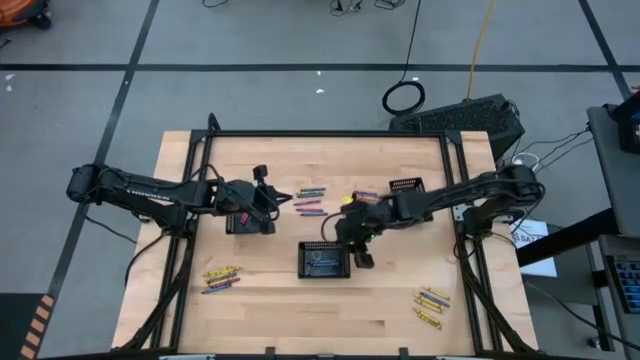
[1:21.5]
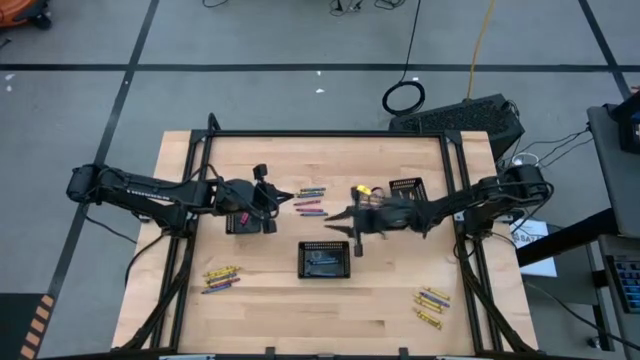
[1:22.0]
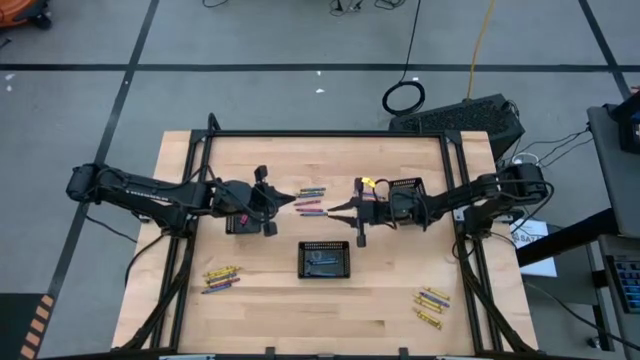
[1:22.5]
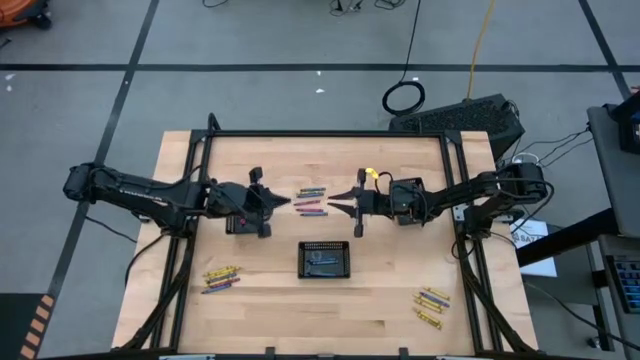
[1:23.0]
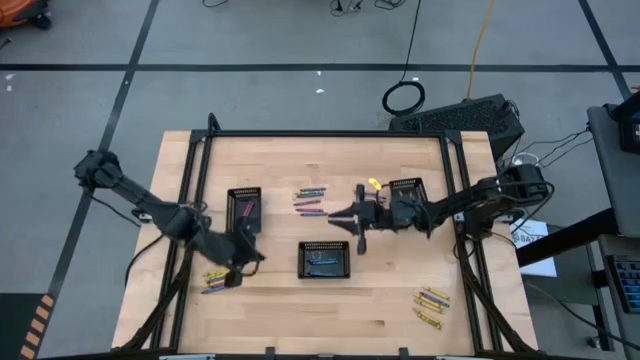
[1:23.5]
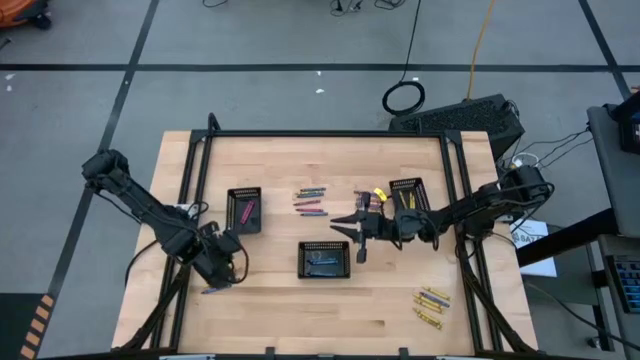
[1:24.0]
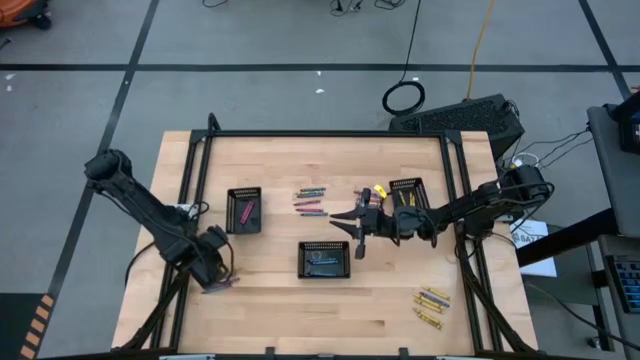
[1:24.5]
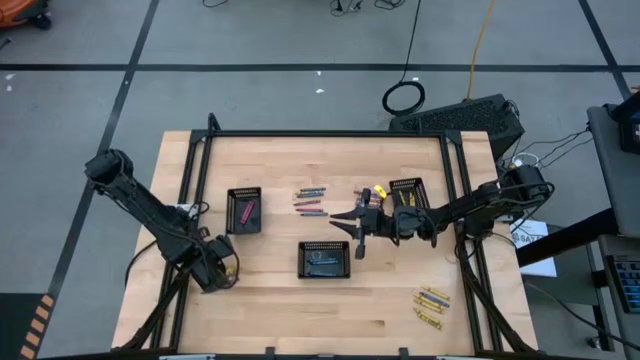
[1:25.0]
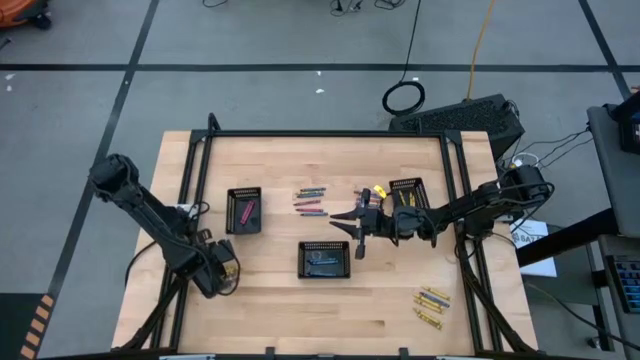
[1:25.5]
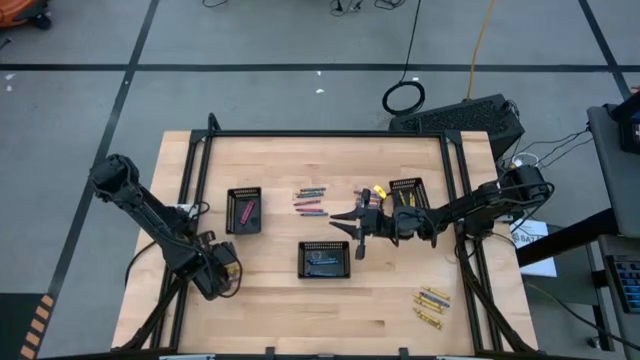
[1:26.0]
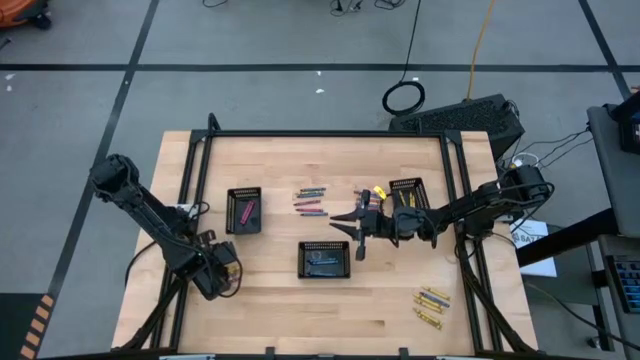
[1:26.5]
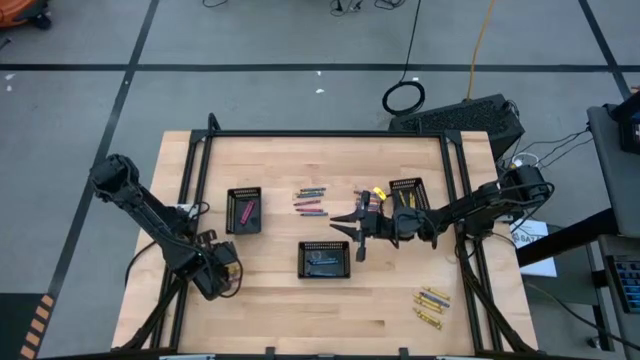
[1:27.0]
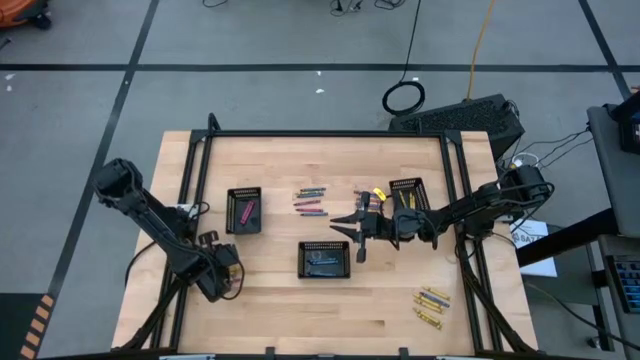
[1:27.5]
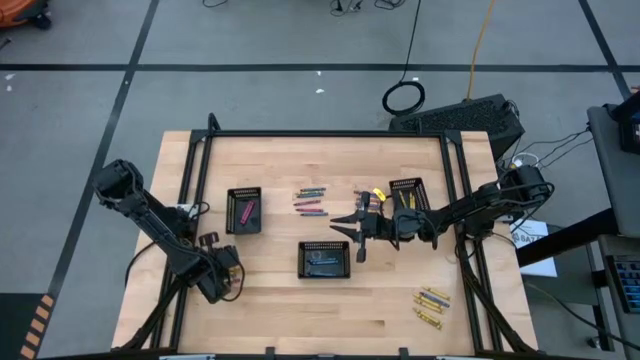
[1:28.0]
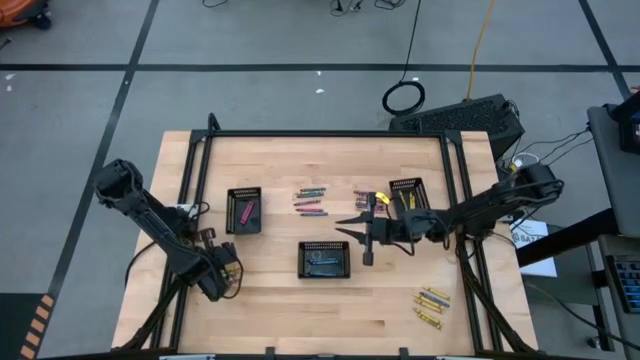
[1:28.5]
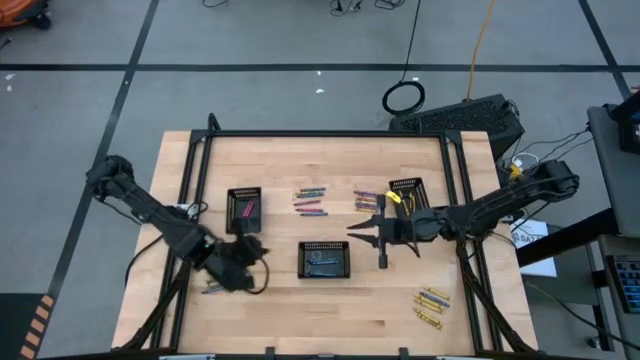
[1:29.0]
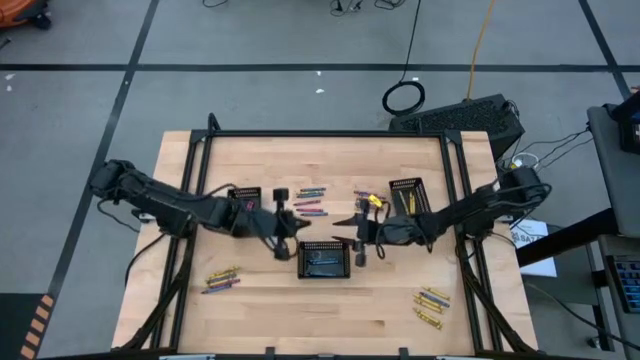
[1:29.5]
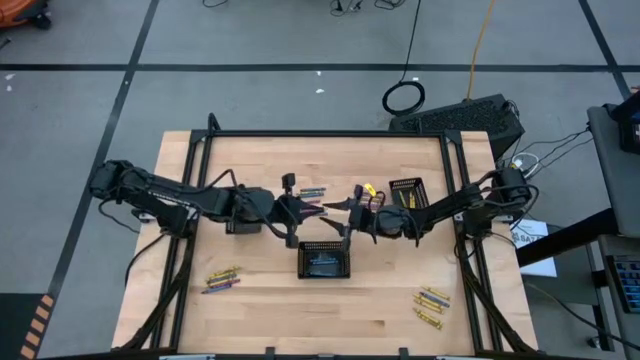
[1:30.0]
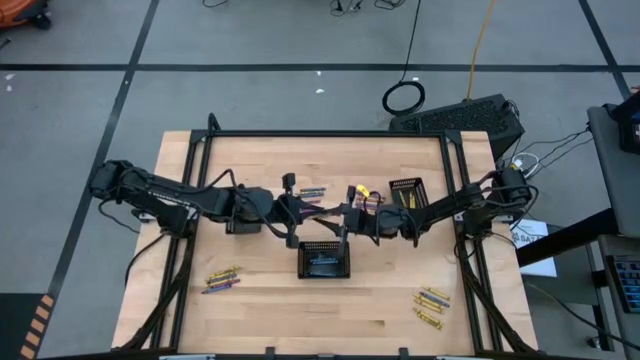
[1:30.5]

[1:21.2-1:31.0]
Task: Sort crayons
Put the yellow crayon into the right black basket

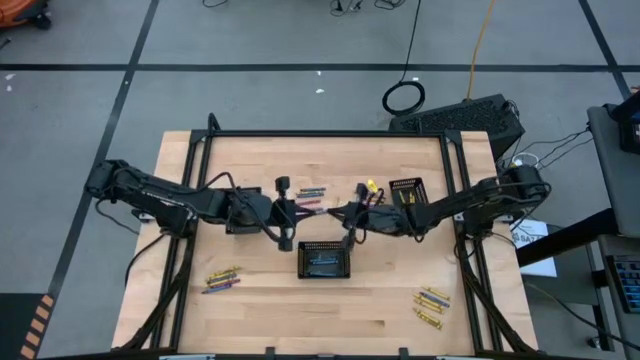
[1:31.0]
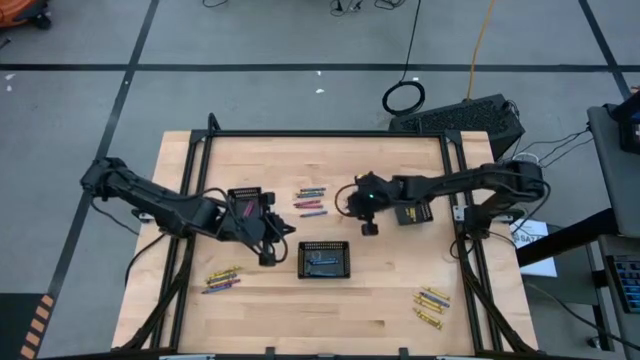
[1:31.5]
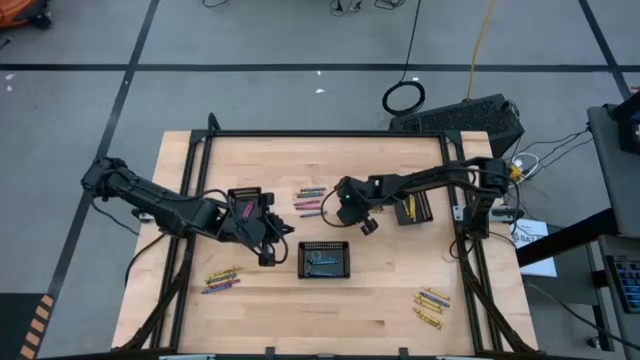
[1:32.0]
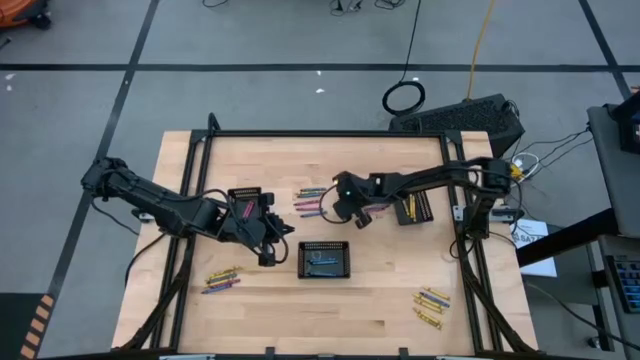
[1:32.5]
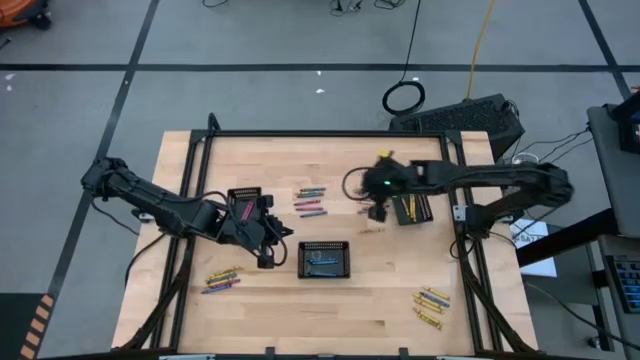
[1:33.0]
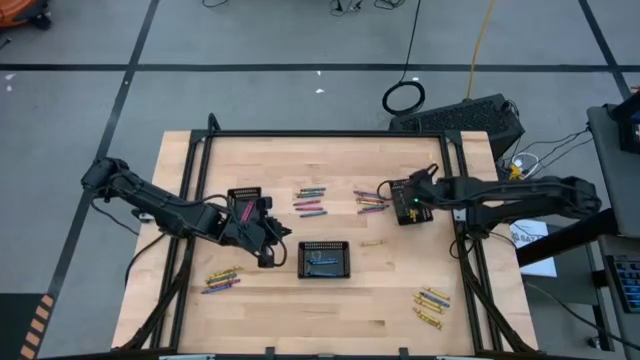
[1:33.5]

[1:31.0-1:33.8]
Put the yellow crayon into the right black basket

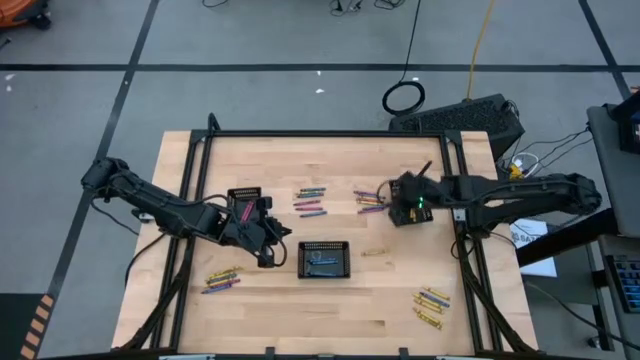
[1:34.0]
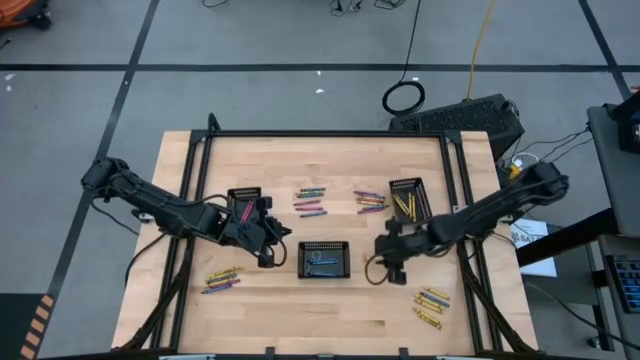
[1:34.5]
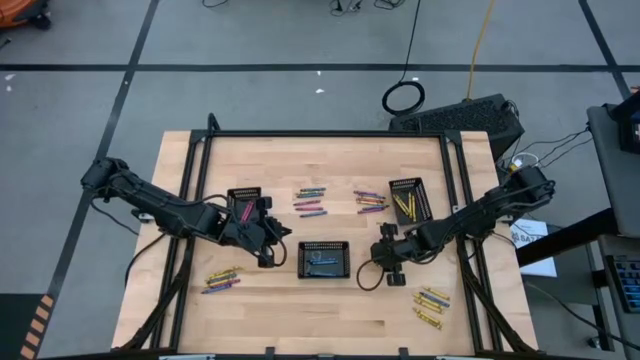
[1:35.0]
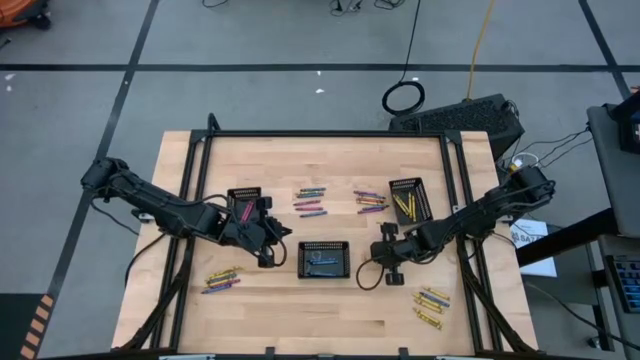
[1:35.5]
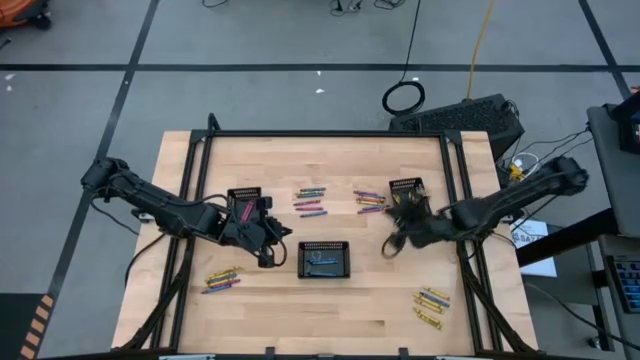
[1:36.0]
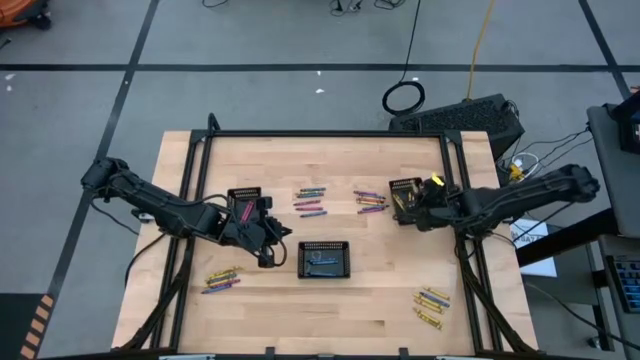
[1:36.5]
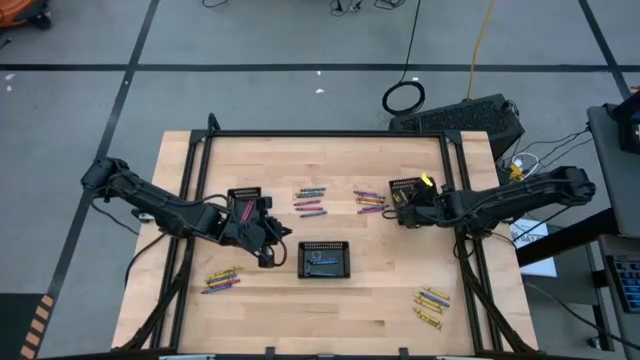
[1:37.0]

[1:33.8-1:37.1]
Put the yellow crayon into the right black basket

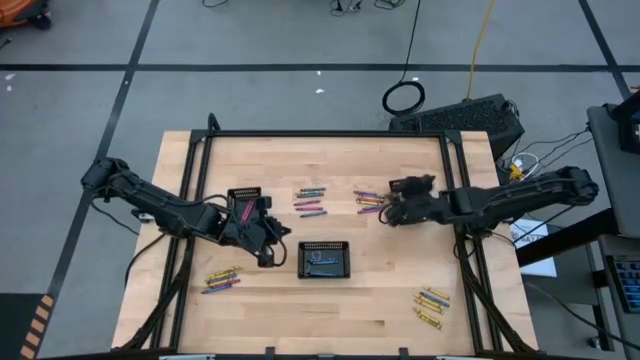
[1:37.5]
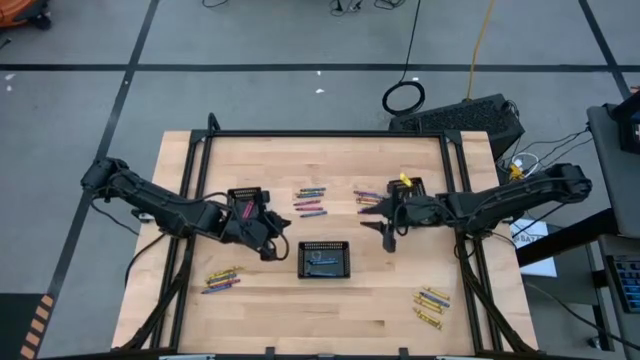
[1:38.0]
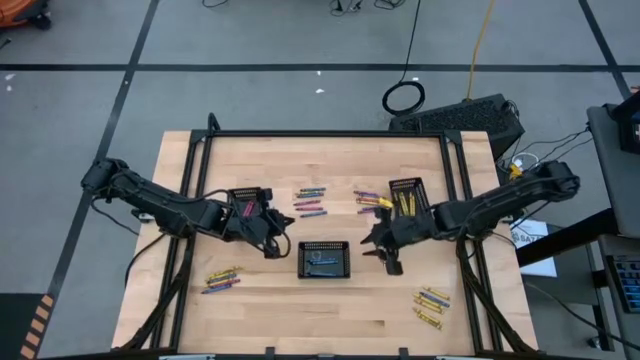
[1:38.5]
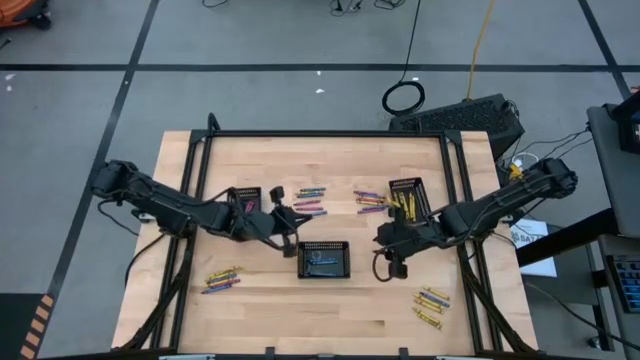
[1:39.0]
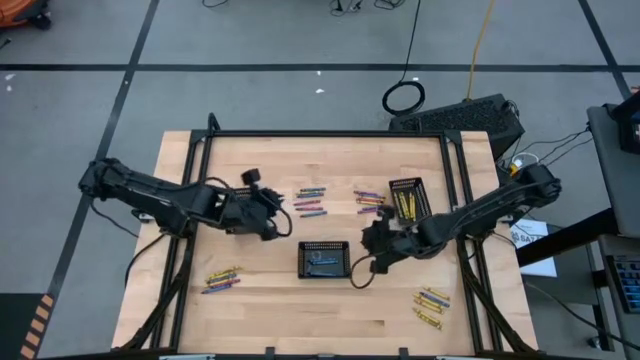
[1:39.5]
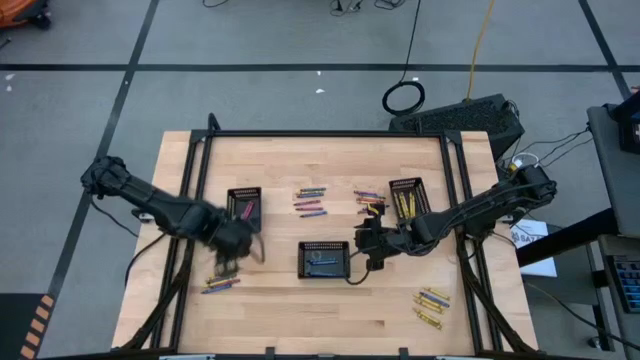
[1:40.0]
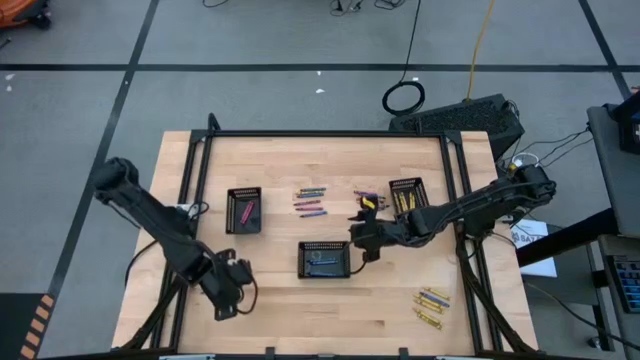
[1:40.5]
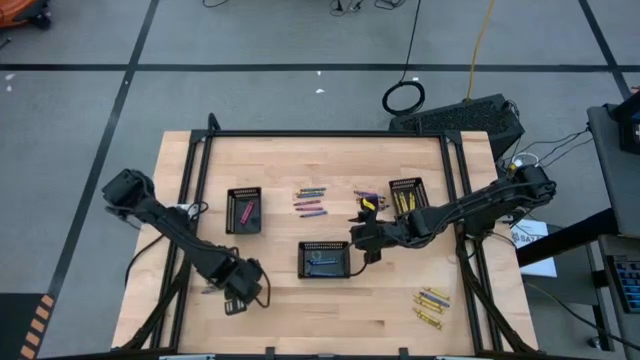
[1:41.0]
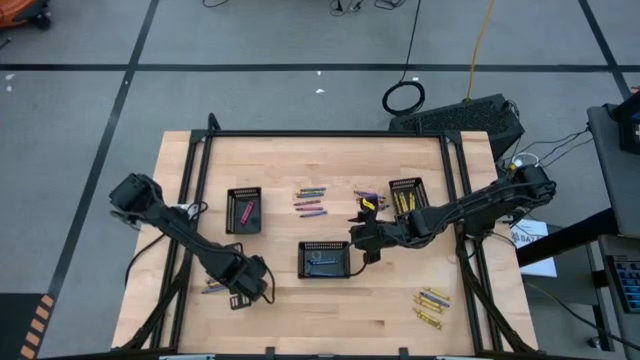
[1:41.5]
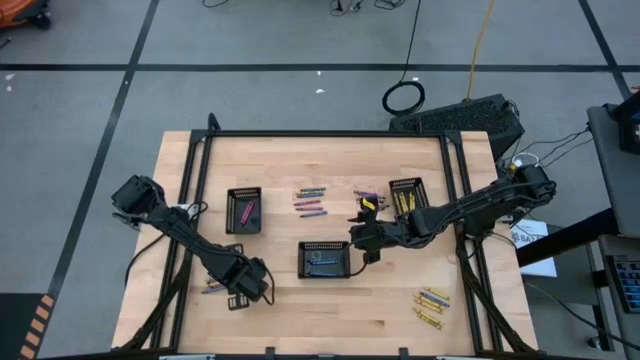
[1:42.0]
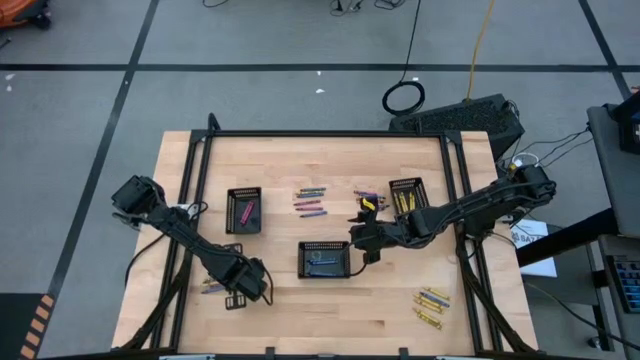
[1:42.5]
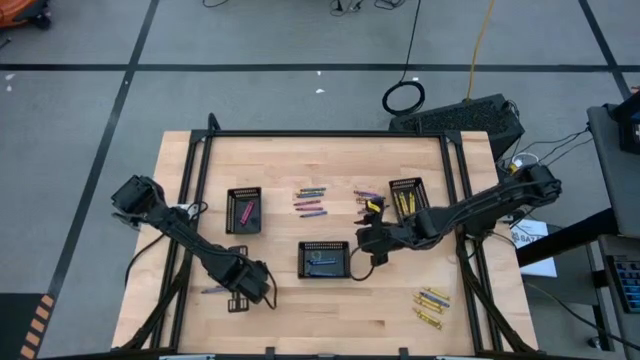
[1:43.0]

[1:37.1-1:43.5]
Put the red crayon into the left black basket
